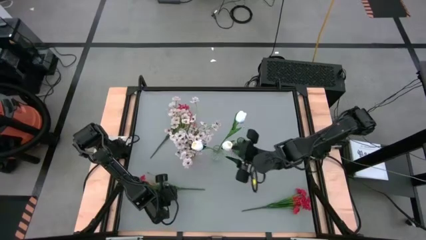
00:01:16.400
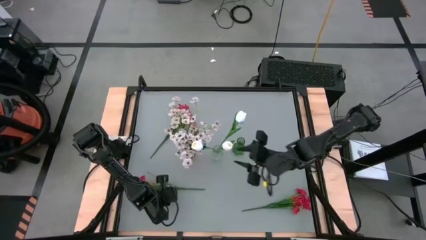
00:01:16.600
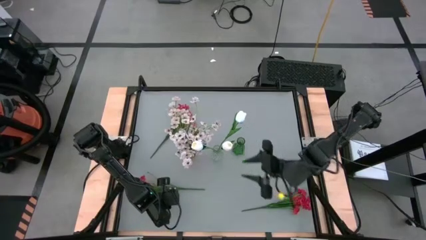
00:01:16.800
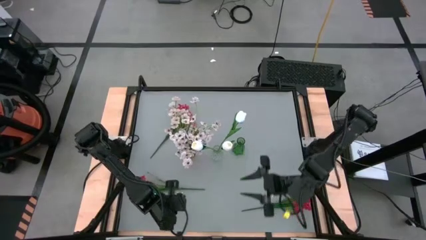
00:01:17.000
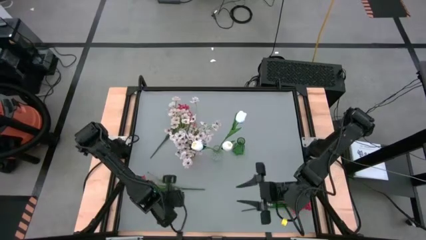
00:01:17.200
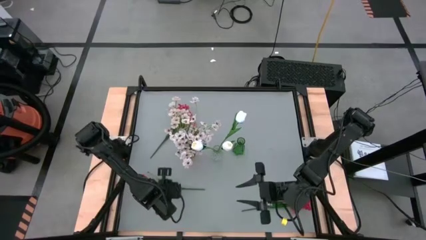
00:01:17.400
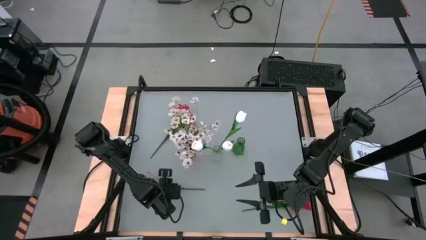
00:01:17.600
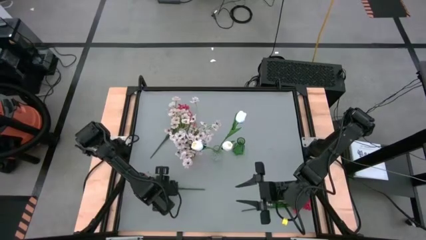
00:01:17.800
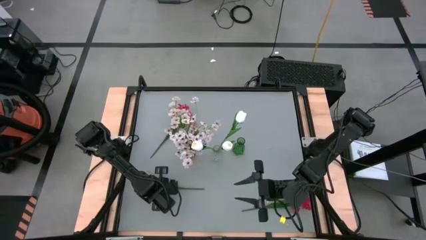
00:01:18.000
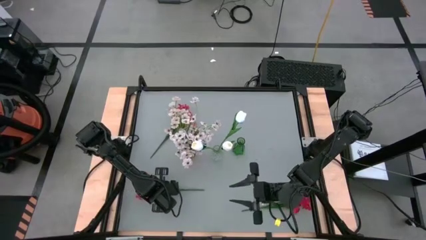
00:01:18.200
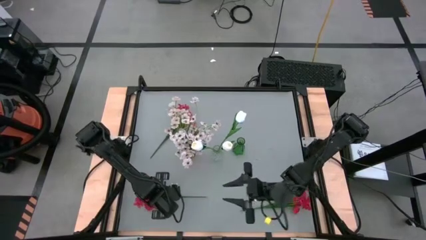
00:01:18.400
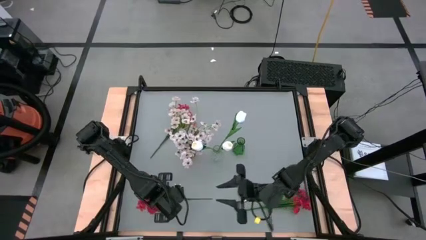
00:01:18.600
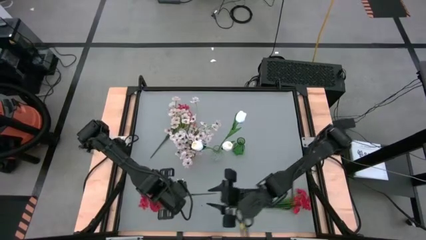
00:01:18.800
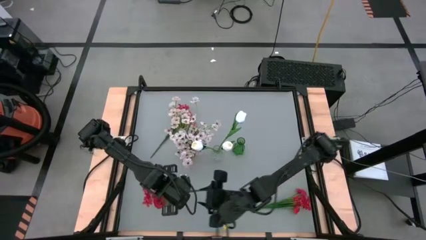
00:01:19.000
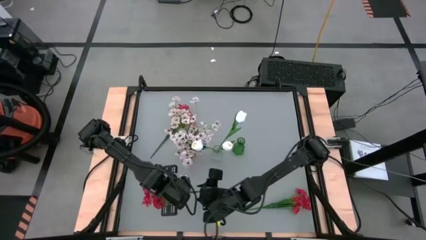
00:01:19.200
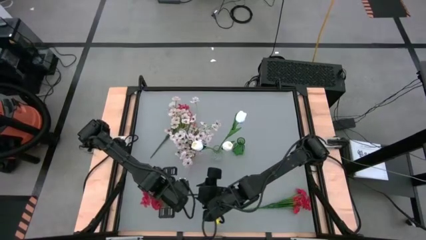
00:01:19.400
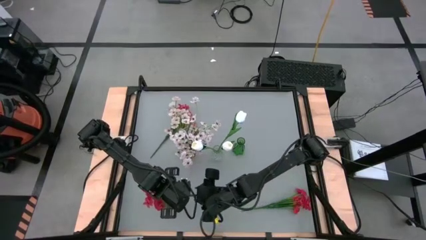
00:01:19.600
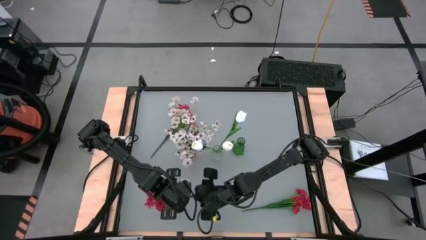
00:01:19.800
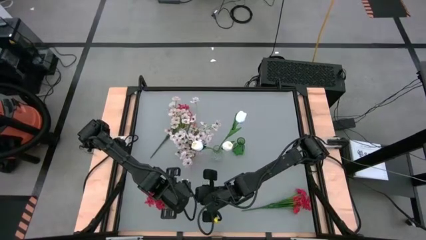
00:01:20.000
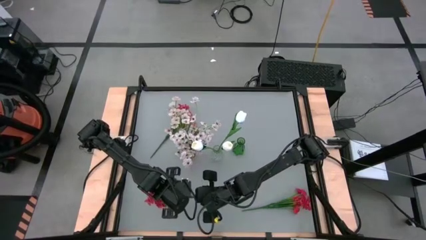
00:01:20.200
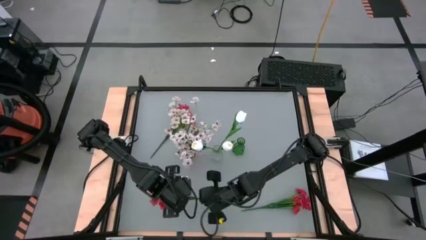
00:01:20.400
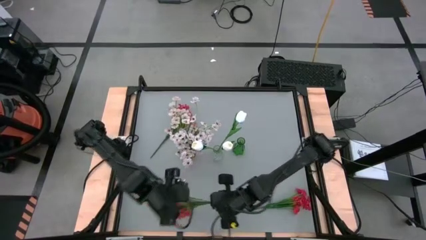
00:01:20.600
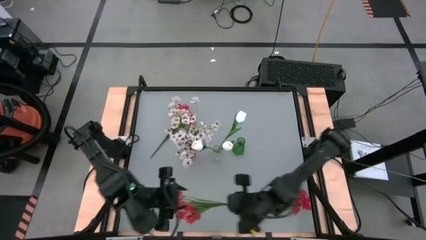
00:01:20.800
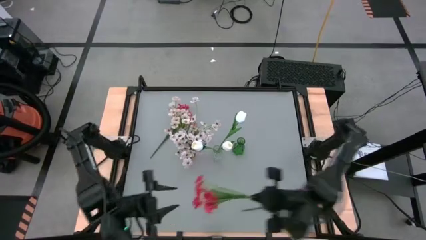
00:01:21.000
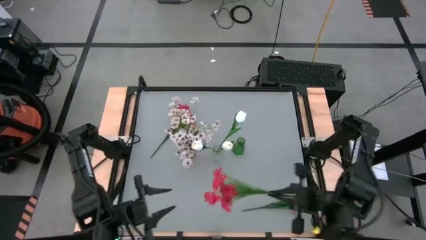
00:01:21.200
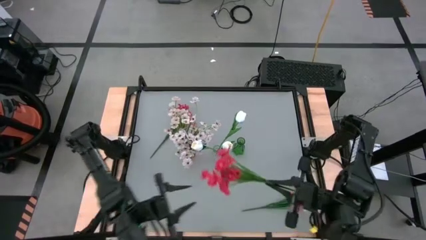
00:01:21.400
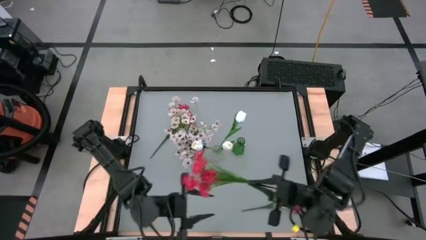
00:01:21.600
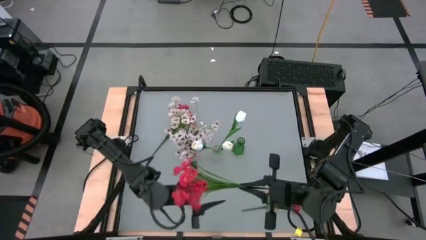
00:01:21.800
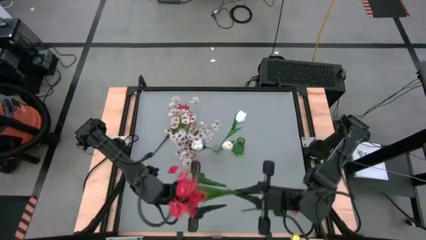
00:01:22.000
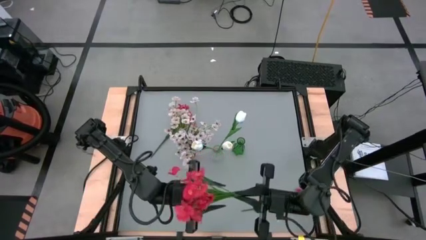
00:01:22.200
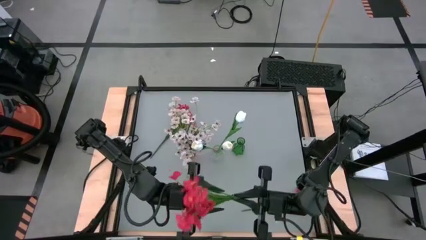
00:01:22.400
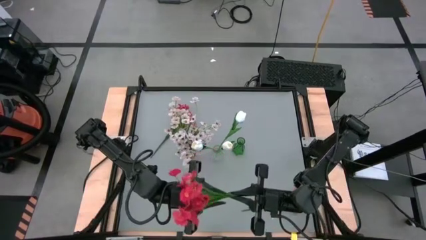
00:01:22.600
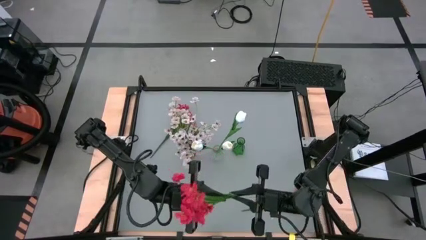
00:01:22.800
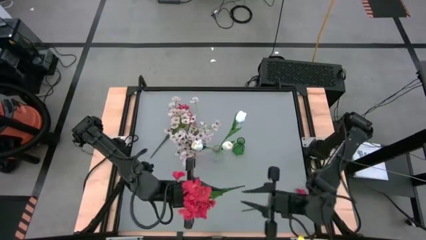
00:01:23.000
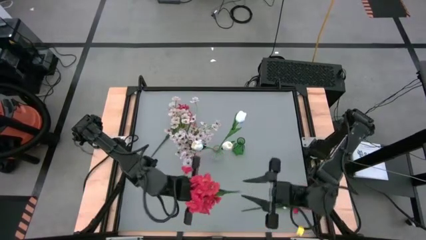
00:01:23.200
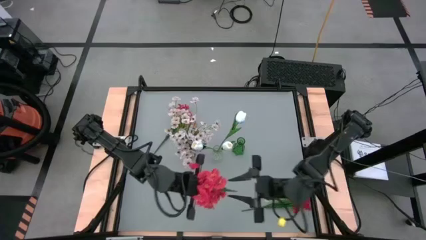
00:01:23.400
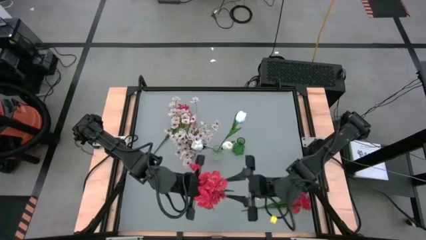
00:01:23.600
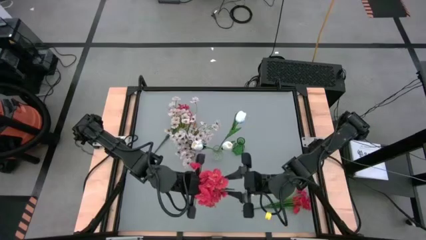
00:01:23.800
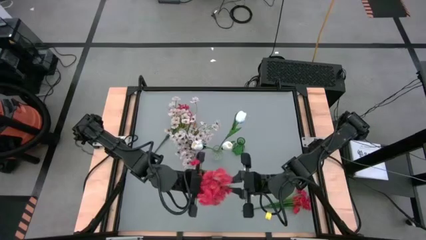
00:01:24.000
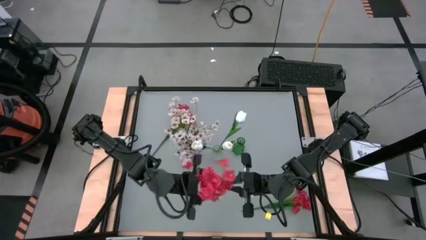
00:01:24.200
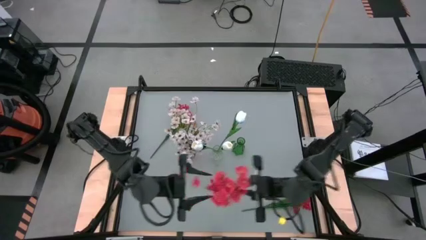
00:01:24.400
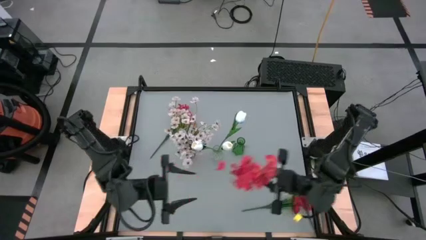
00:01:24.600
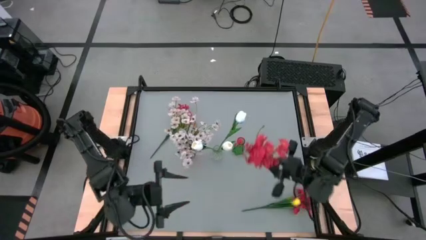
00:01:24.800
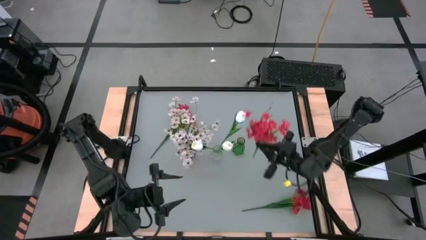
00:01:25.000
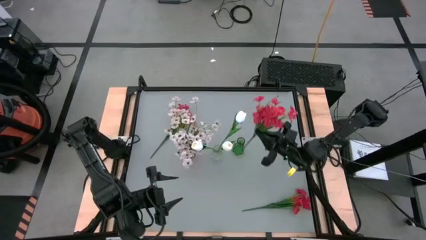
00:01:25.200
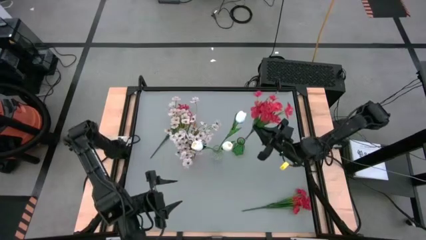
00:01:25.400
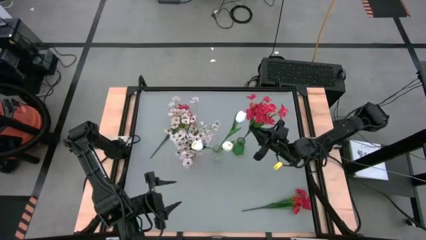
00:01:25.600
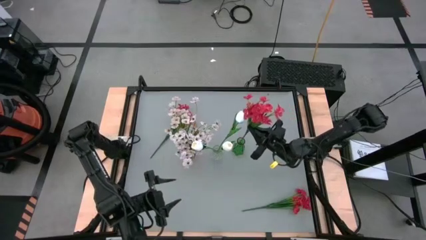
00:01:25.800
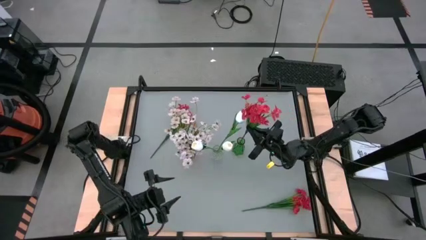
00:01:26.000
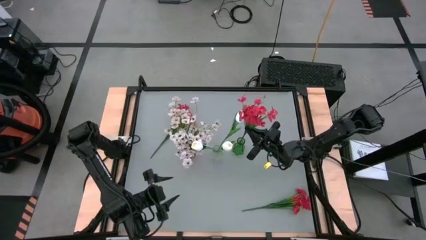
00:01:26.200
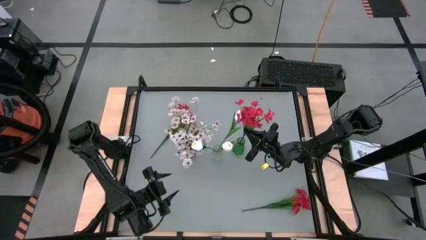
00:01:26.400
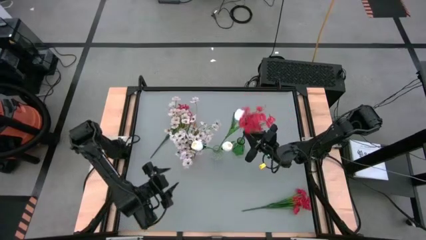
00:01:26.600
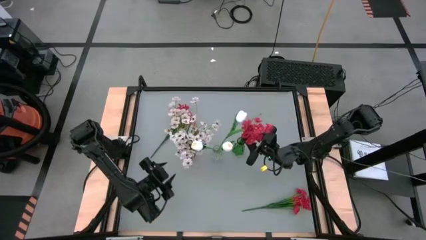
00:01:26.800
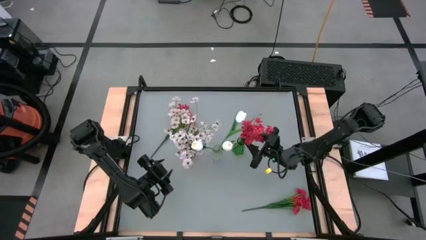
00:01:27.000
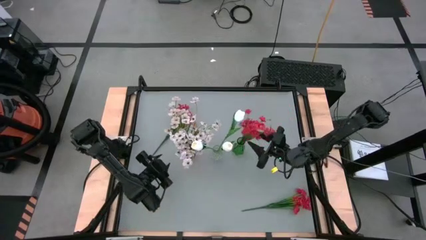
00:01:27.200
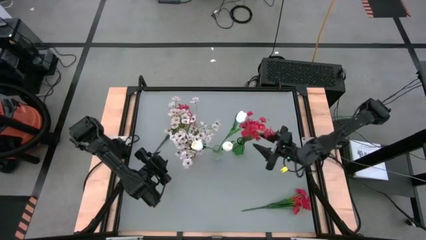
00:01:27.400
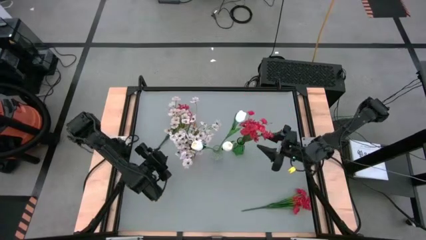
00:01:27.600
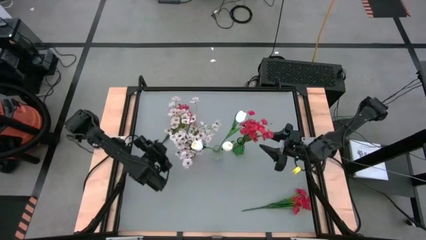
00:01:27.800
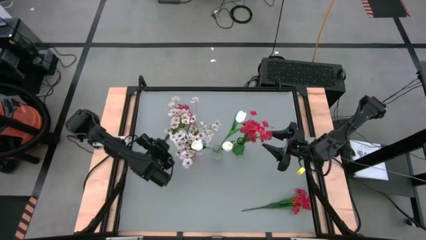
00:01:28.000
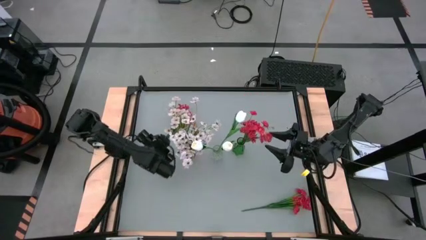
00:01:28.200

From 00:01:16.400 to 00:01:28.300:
Task: Sort flowers into vase by color
Put the bottom left red flower into the green flower vase

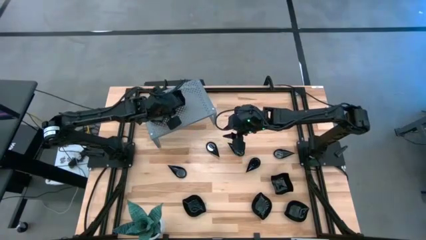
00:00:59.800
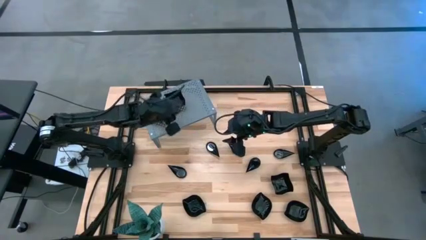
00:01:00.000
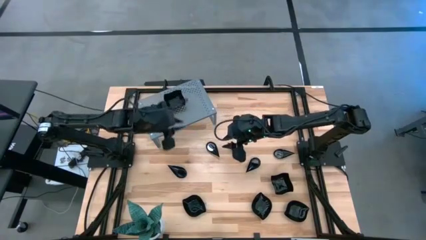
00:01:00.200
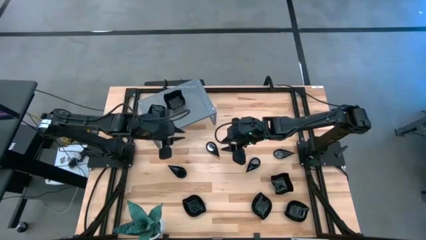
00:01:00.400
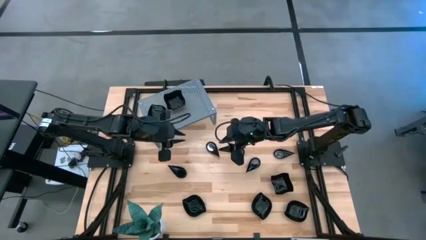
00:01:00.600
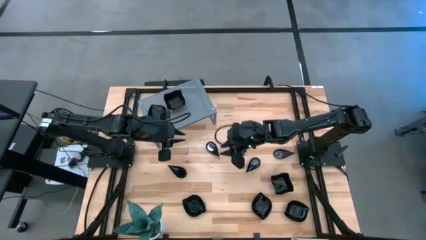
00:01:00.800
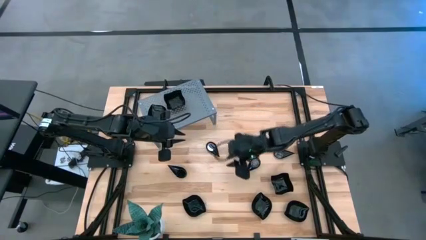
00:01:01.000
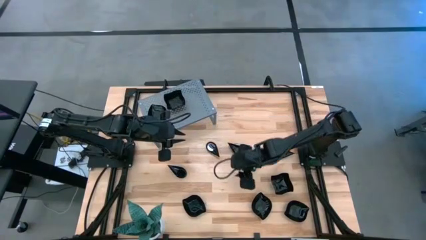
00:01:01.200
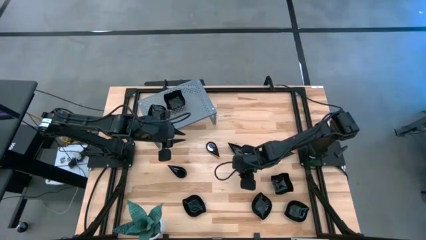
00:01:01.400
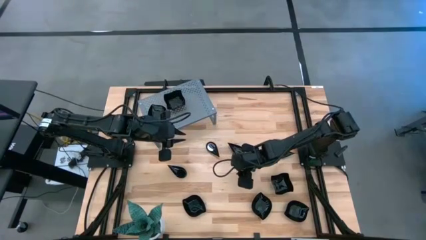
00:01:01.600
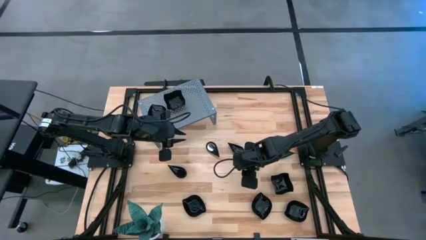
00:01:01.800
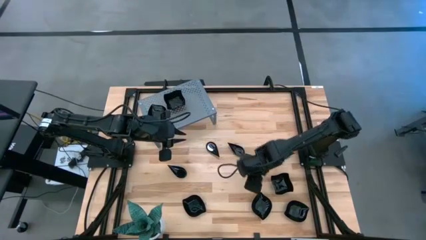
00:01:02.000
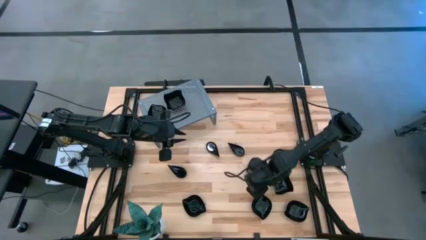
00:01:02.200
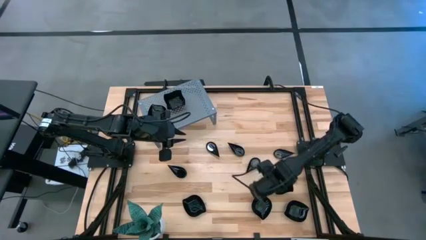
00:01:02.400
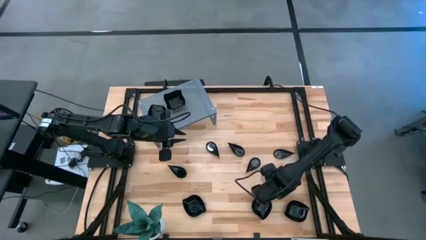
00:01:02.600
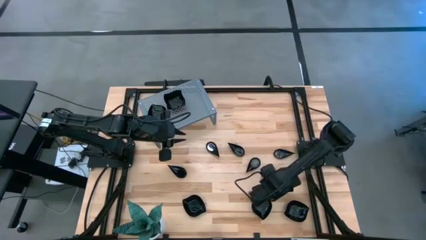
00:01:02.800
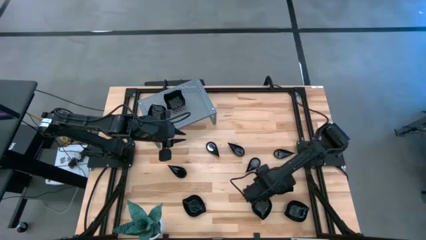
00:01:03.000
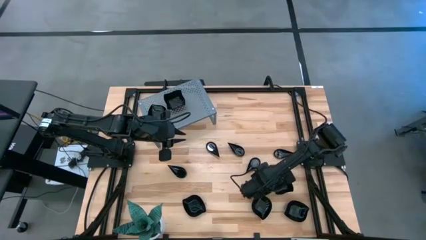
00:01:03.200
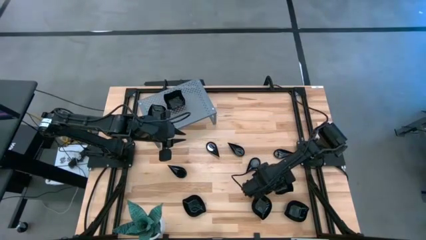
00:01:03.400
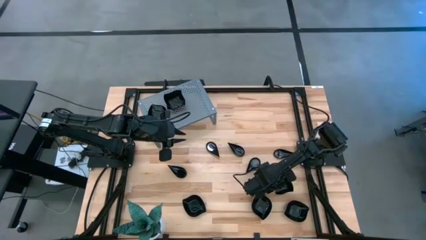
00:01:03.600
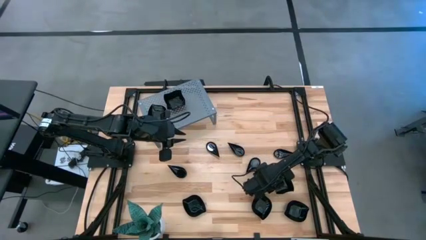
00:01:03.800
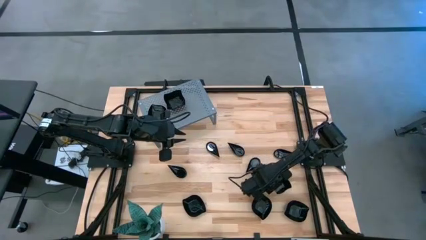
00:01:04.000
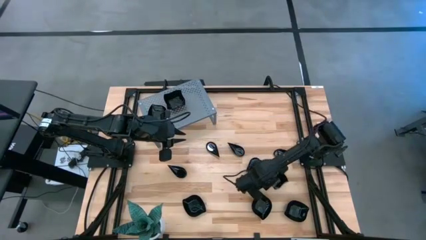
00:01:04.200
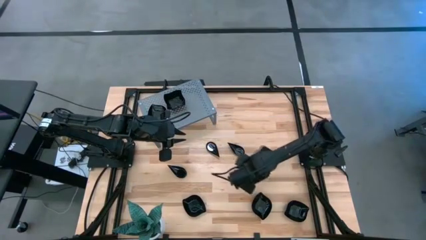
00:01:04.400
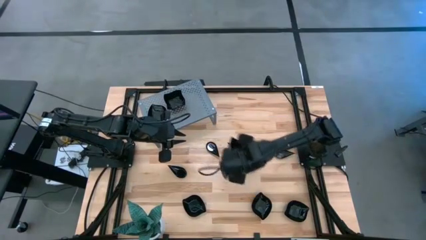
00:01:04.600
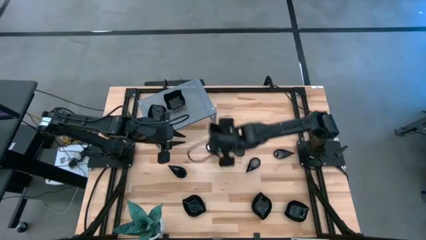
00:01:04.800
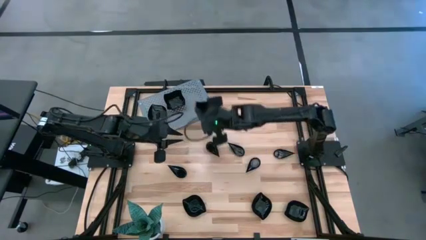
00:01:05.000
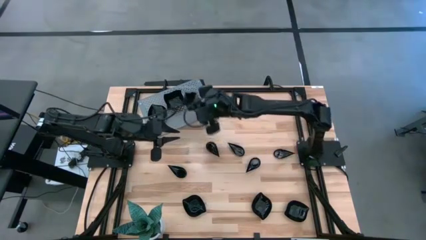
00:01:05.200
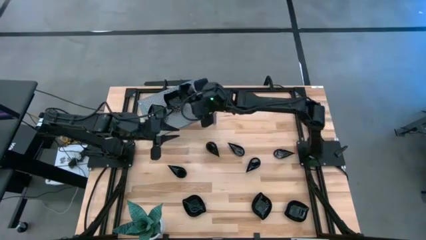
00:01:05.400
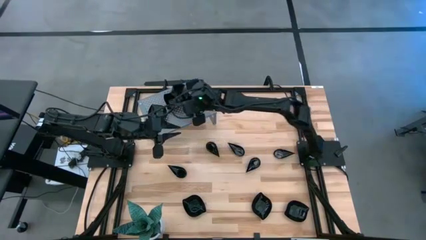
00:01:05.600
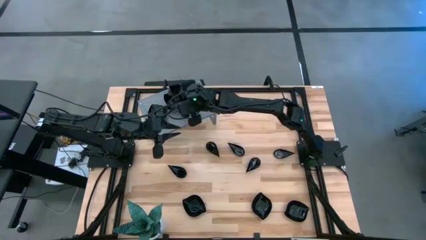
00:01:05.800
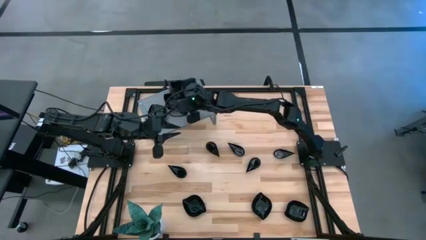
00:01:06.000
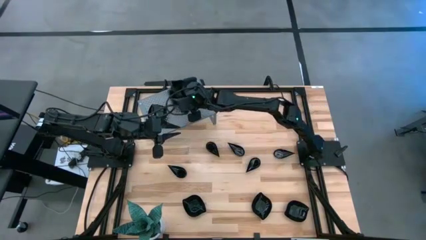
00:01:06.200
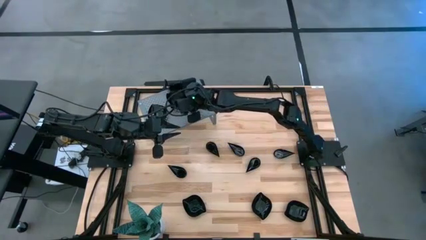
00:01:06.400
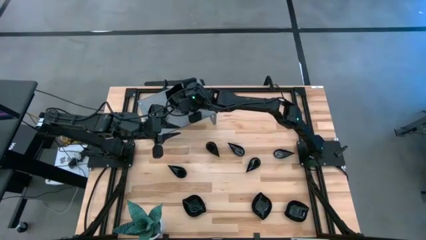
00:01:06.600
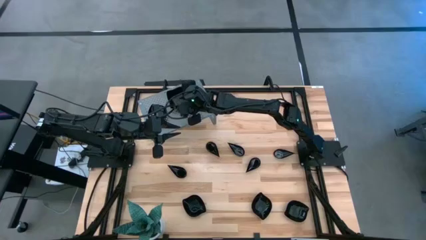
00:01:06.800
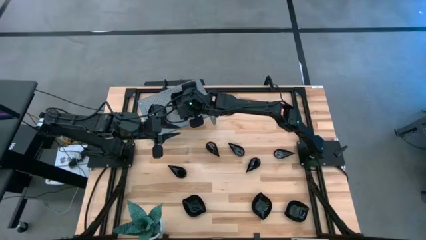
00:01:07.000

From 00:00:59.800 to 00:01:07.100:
Task: Pick & Place Mini shaped plates
Stack the black distorted square plate on top of the black distorted square plate on the shelf
